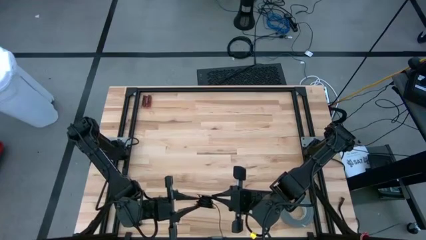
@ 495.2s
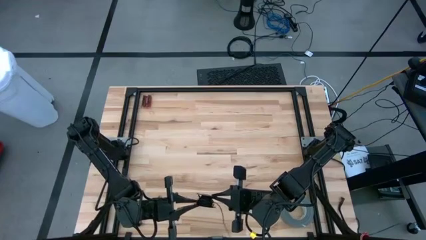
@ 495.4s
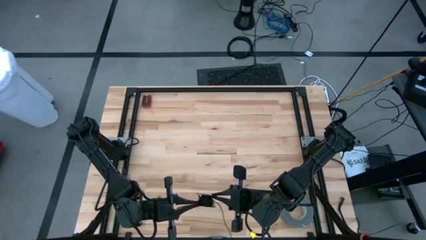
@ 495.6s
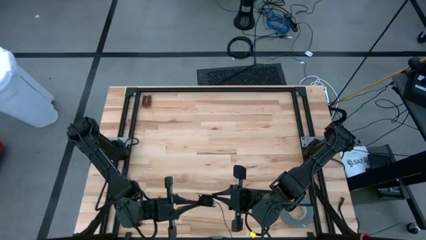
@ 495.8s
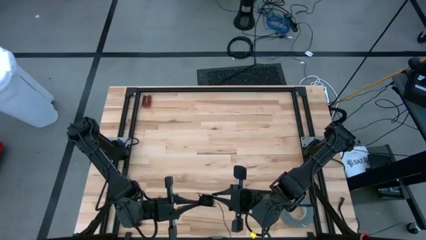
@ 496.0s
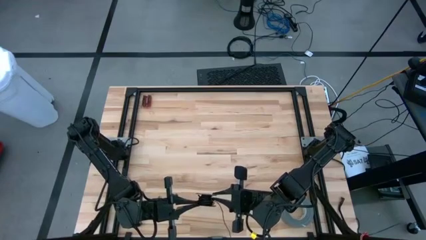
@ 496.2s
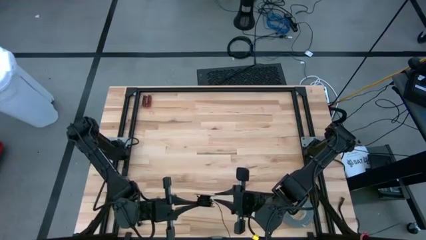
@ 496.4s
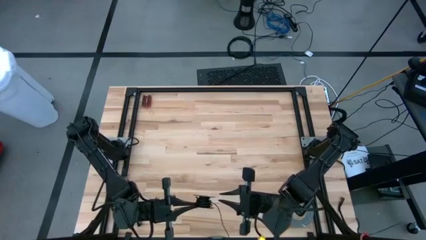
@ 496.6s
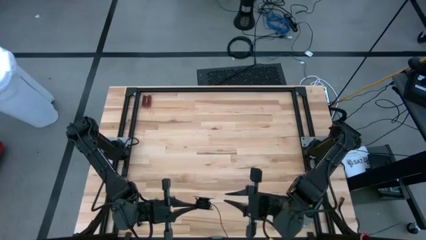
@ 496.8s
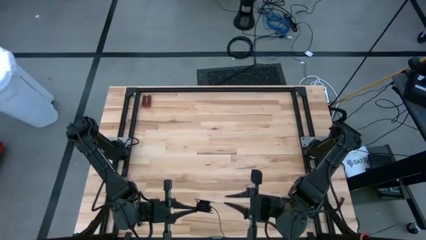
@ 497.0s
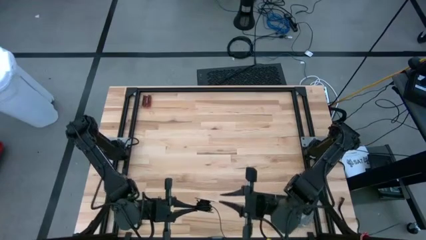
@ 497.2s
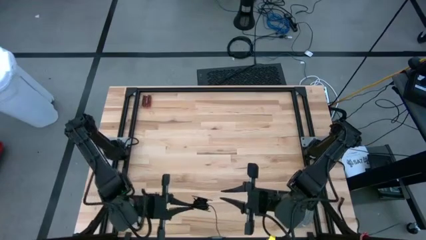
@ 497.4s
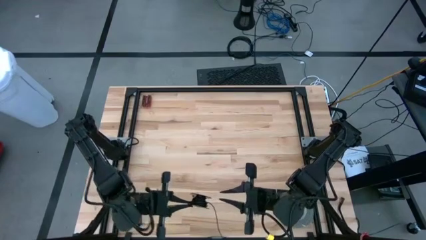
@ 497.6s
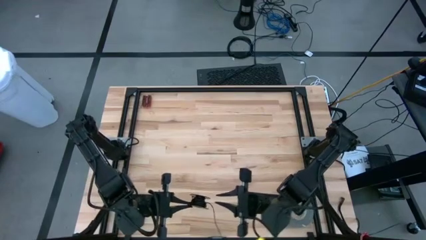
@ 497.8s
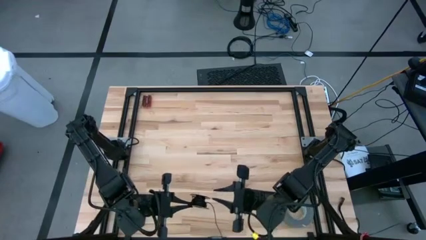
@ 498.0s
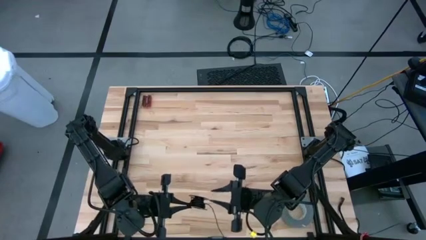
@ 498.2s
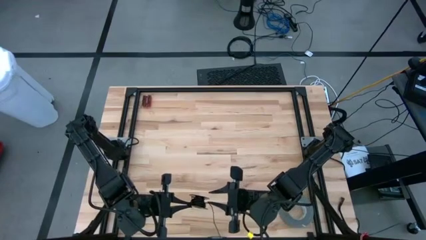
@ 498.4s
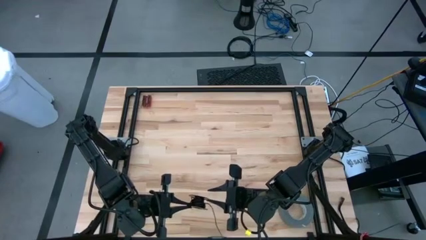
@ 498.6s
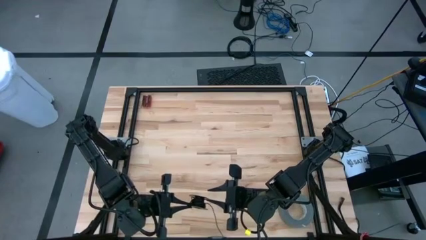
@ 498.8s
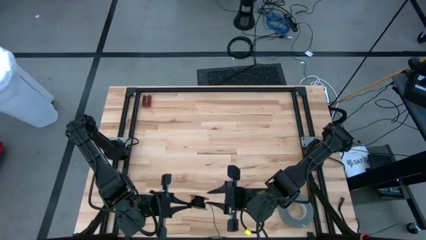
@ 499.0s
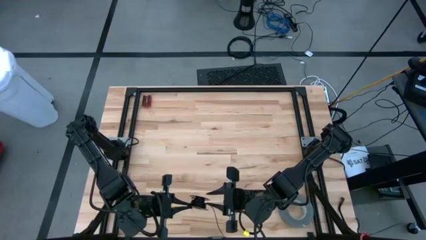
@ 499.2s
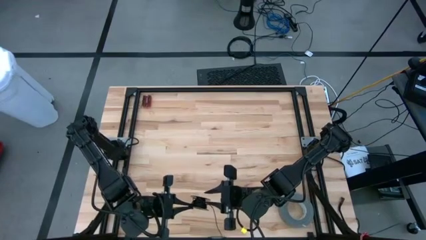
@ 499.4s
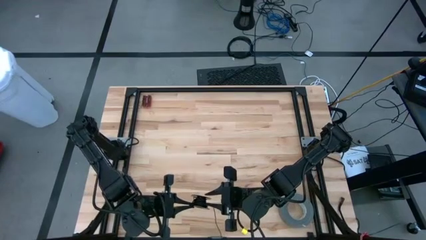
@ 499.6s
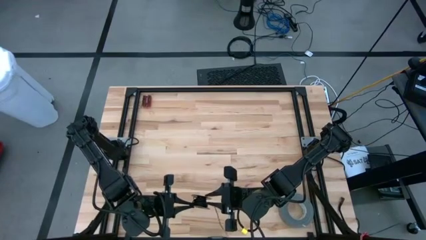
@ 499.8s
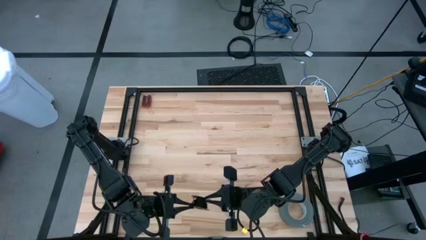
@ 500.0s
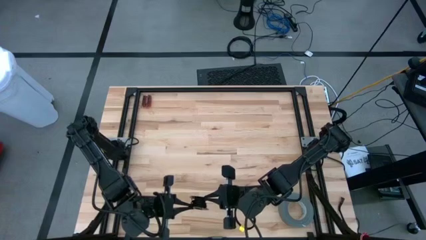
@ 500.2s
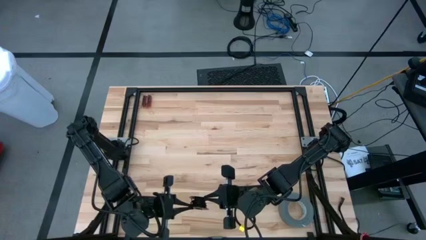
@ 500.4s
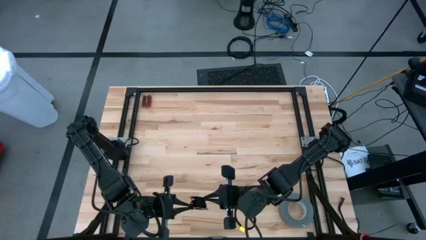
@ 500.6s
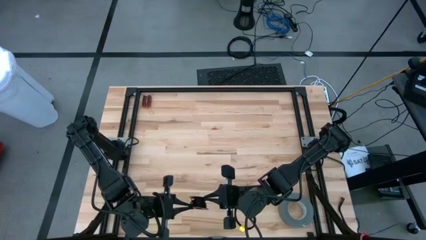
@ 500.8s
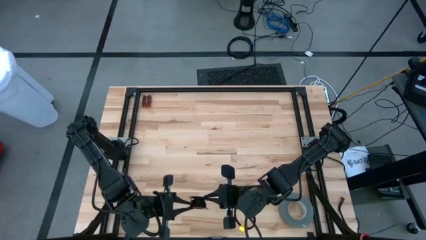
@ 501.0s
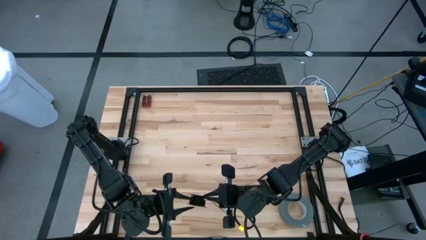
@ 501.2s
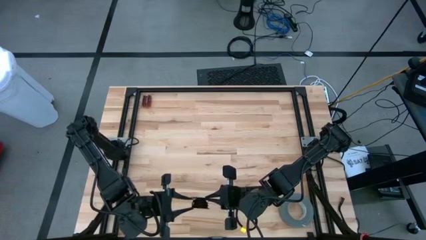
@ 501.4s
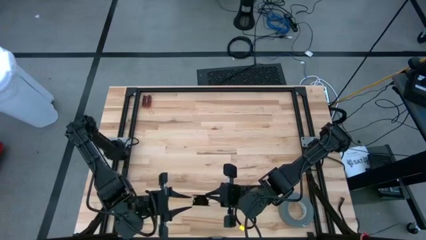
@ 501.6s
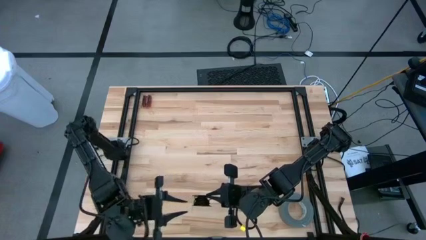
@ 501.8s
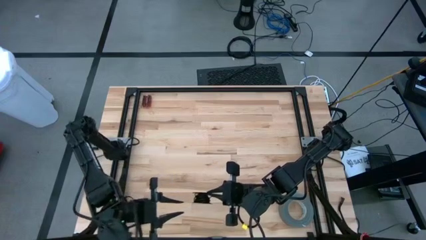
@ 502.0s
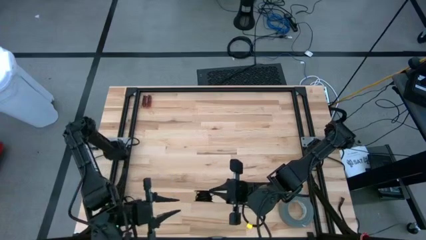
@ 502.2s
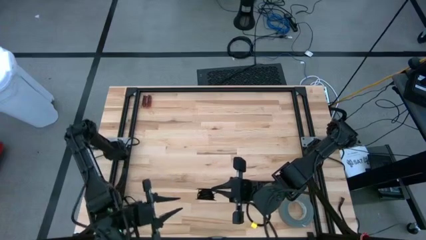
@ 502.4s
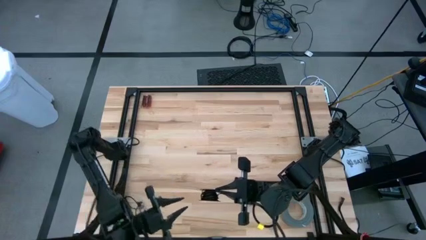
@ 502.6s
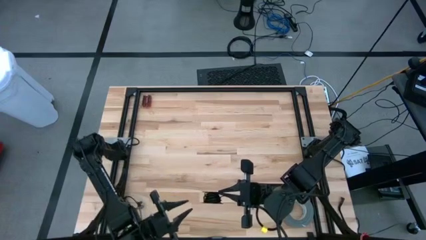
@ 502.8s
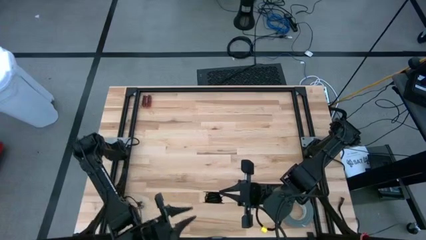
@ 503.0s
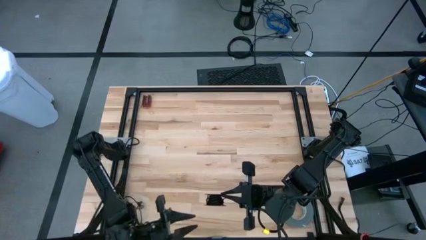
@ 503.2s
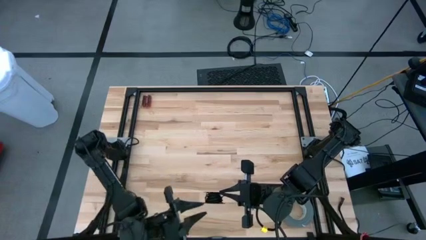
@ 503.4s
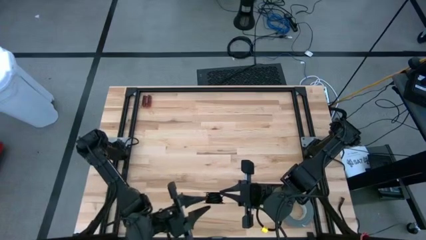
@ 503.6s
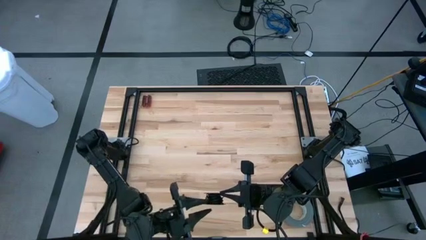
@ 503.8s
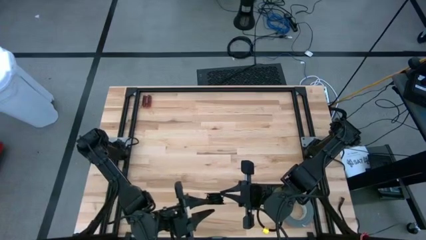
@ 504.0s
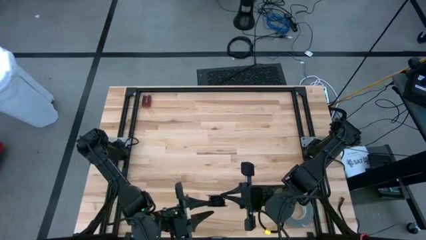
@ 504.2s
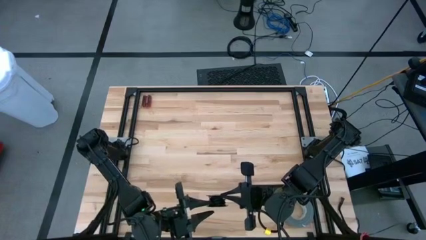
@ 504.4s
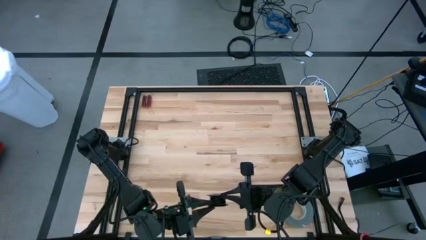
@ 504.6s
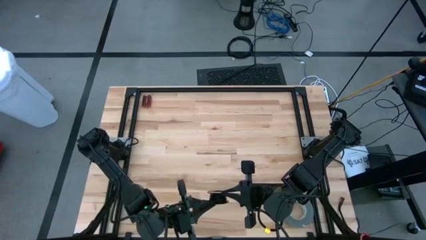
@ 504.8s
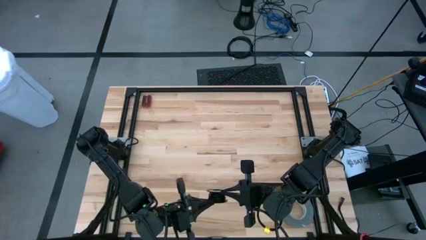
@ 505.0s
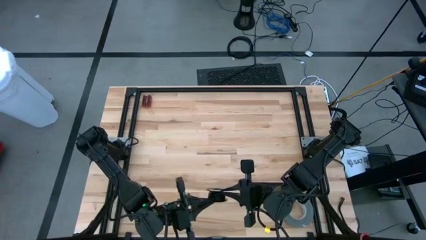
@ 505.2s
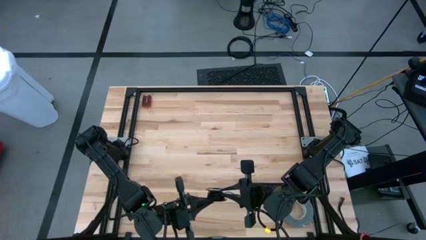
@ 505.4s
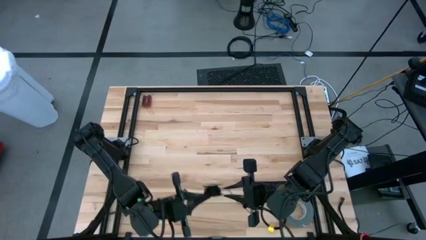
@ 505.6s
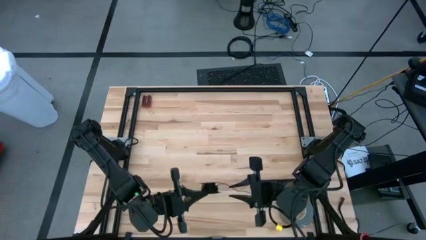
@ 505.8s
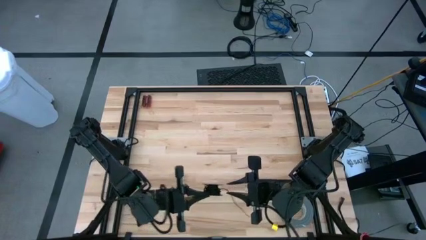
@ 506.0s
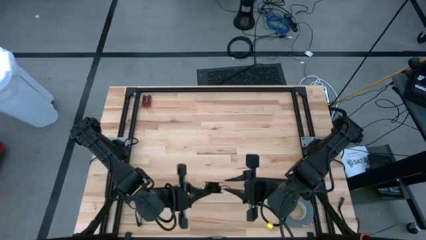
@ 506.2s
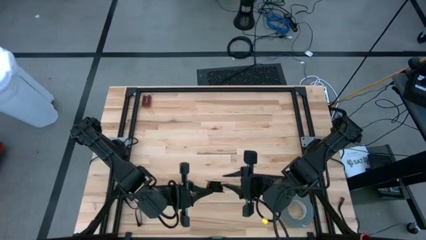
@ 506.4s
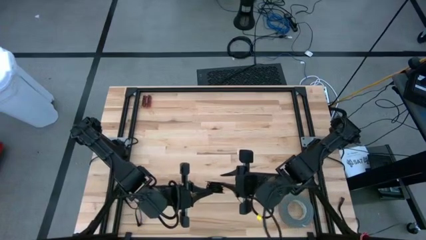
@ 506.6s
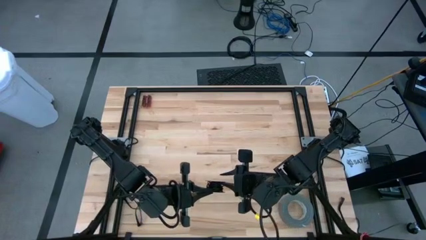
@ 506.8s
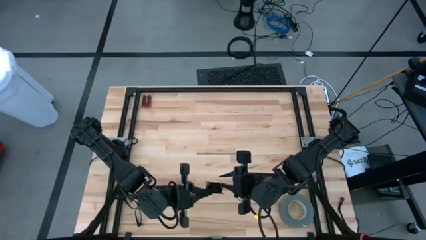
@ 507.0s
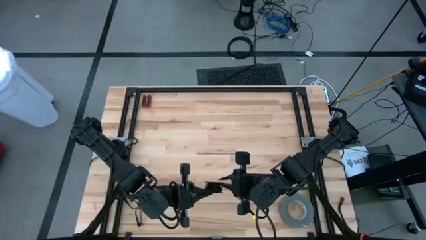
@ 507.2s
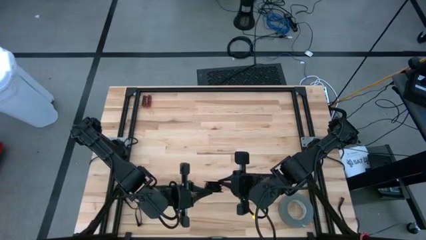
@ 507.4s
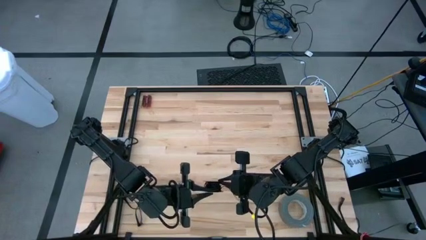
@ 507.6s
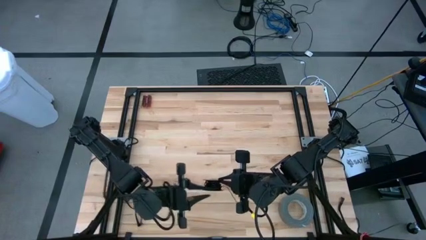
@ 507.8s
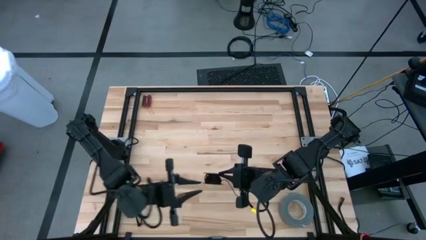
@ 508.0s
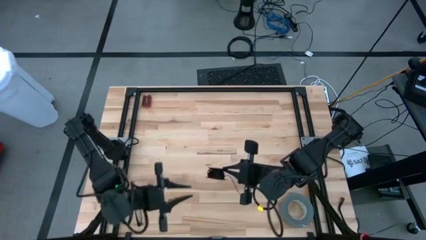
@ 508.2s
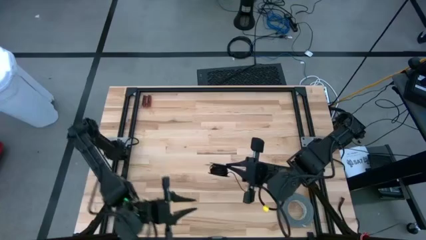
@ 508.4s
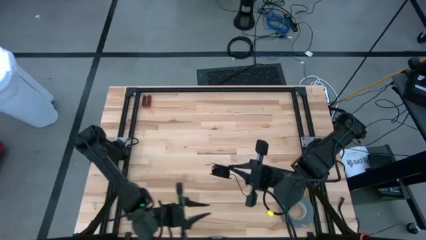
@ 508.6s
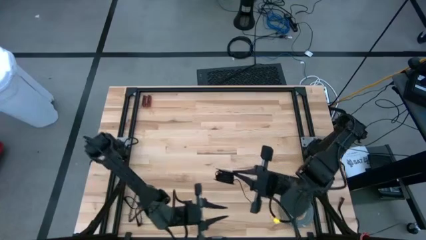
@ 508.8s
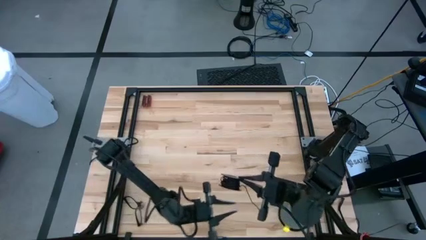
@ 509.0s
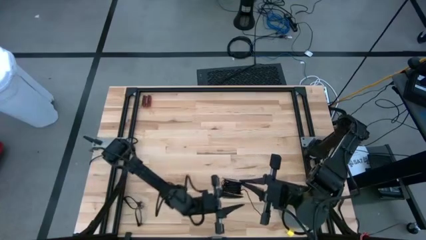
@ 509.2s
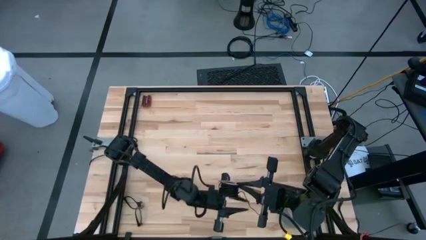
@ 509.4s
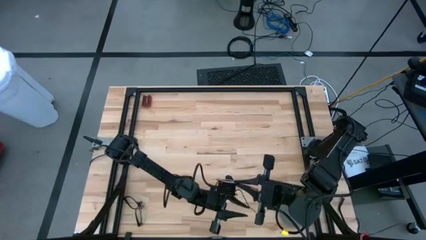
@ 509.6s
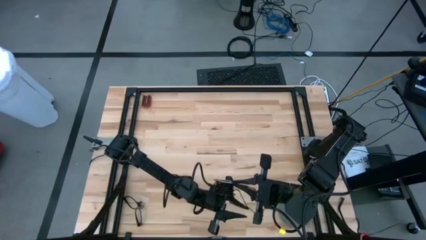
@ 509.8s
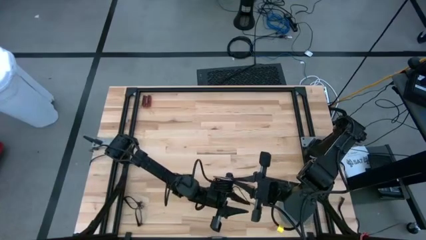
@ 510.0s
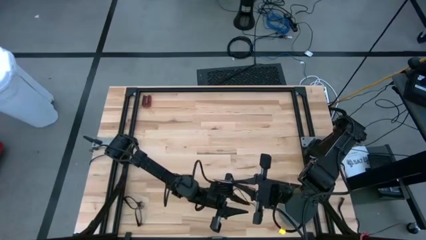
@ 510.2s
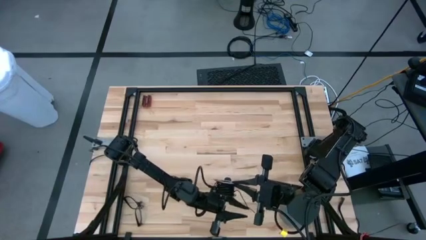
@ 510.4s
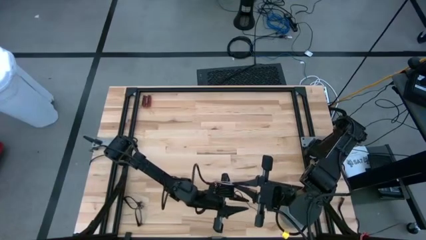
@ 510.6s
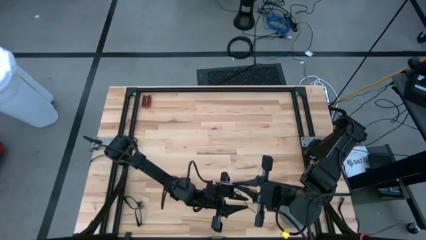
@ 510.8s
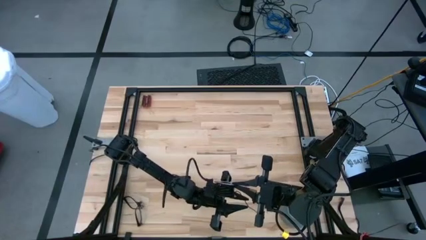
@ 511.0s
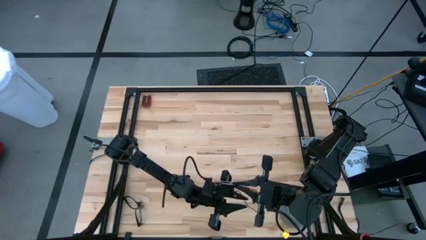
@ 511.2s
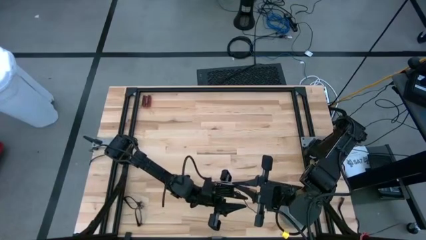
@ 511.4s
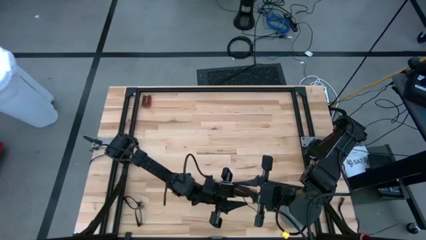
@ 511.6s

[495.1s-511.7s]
Task: Coil cords
Coil the black wire on the spool
